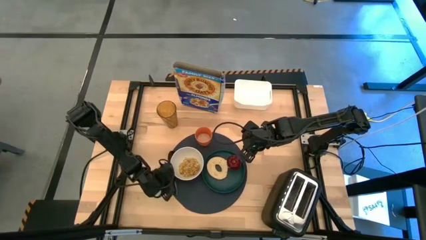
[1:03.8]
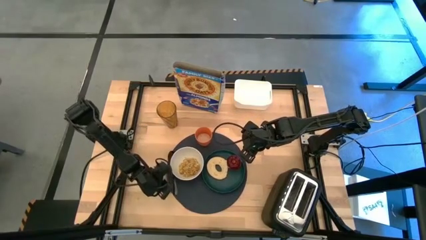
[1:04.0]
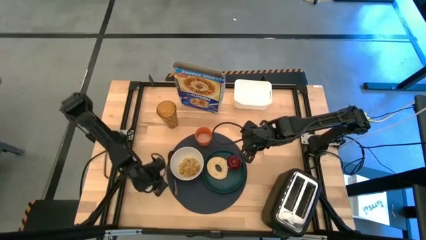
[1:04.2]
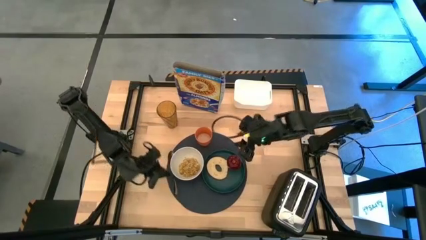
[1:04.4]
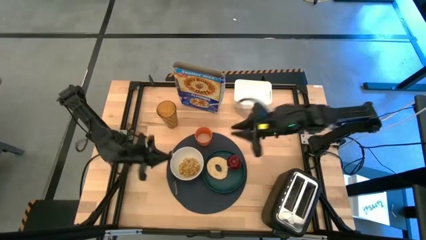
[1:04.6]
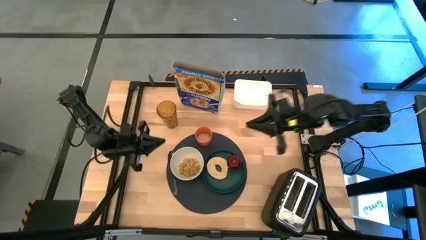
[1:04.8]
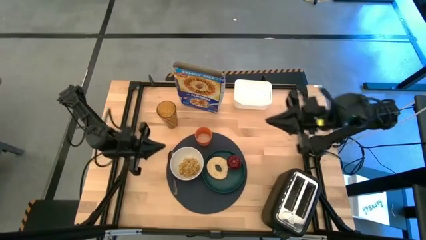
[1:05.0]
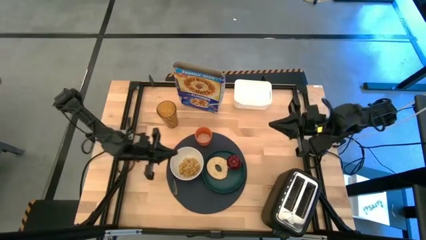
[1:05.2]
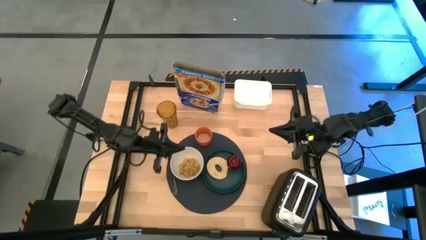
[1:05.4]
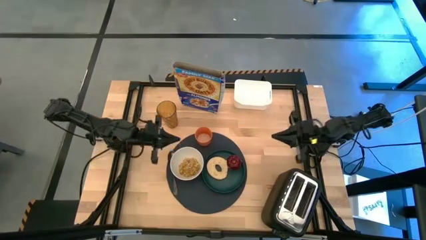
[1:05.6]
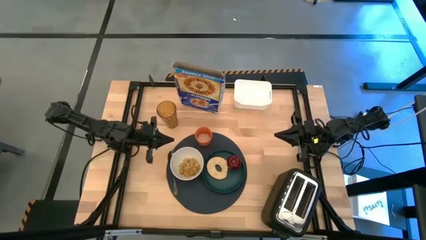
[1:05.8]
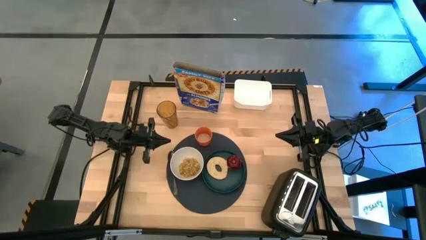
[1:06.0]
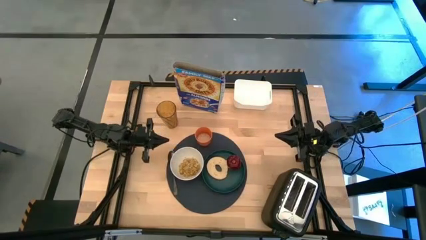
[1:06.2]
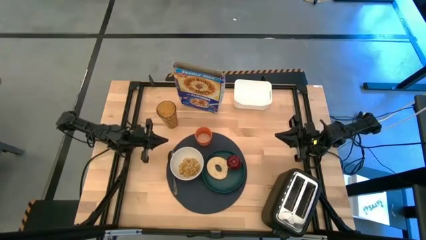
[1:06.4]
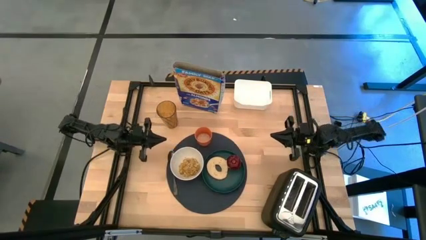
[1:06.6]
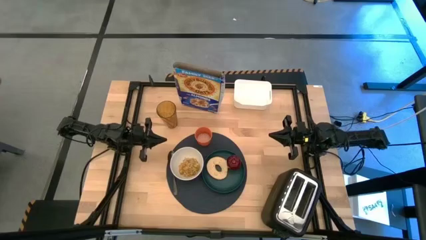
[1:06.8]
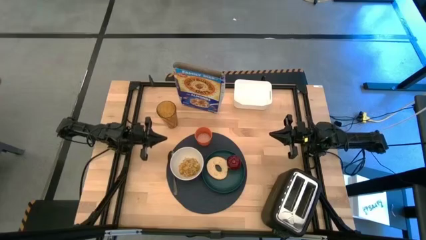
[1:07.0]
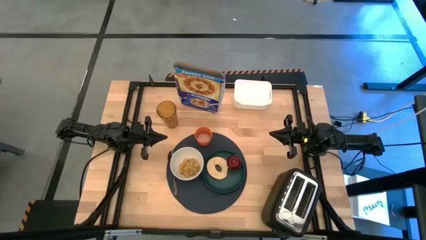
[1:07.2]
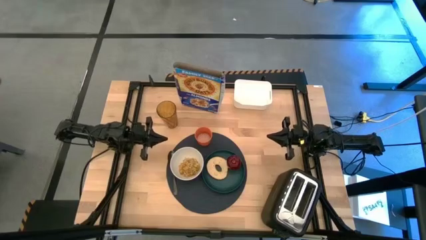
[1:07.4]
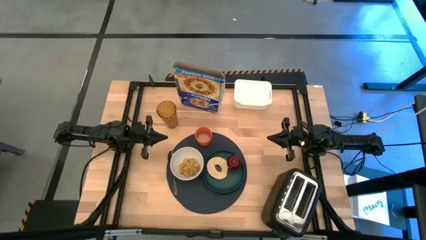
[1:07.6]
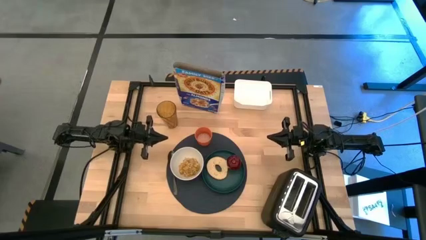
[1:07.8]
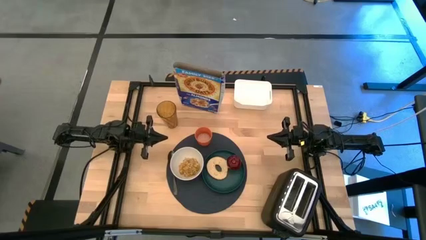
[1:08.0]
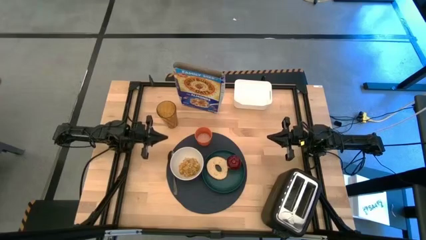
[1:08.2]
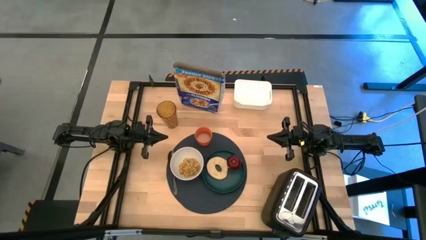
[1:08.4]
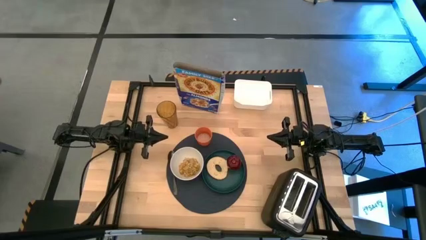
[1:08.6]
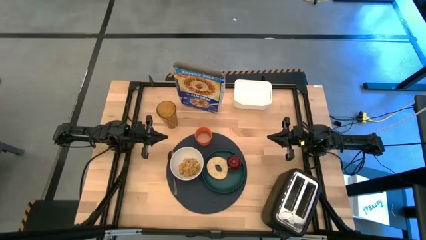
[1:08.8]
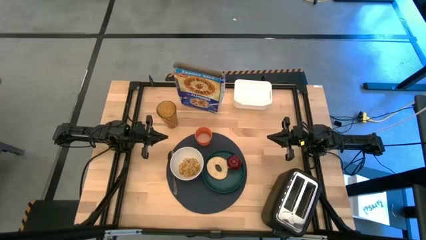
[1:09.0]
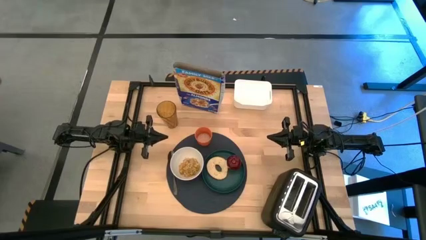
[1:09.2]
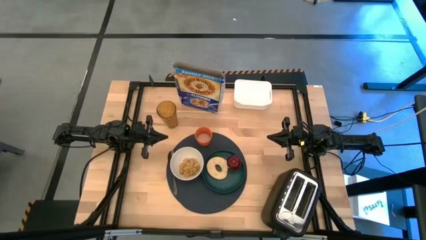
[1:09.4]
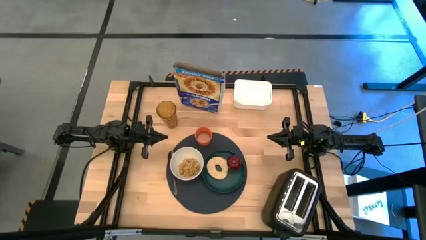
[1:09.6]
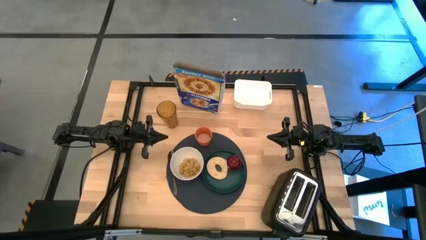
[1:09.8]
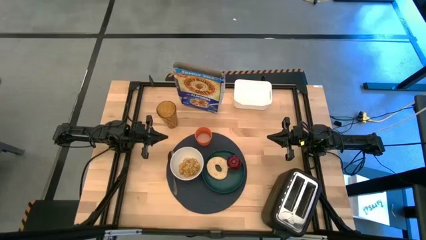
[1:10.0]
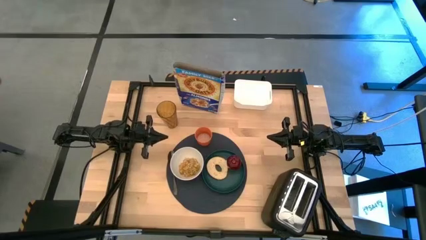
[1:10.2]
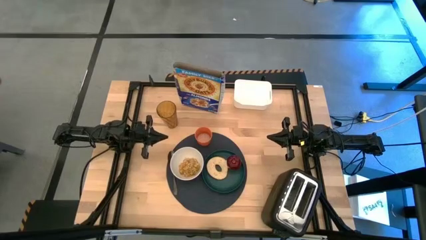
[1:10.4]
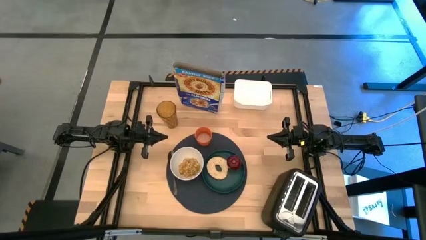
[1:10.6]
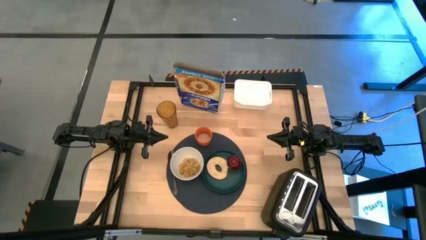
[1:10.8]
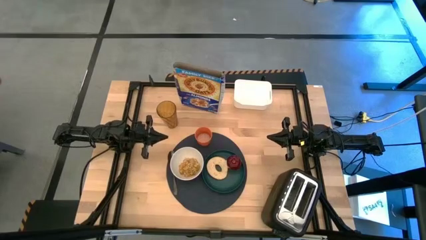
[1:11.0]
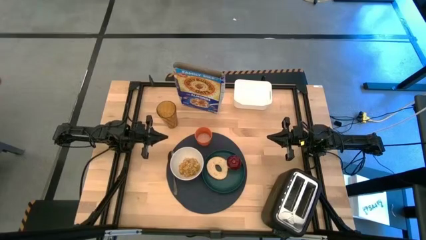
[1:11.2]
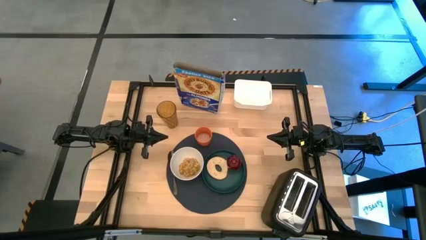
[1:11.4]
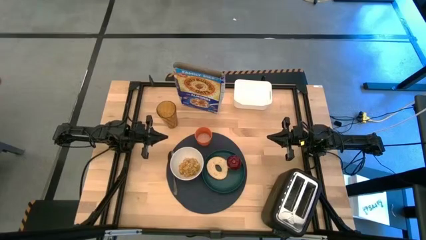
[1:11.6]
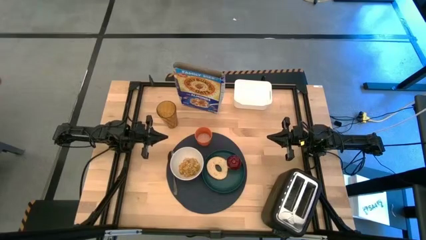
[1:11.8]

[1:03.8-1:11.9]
Task: Arrange a breakfast setting
Return to Home Position

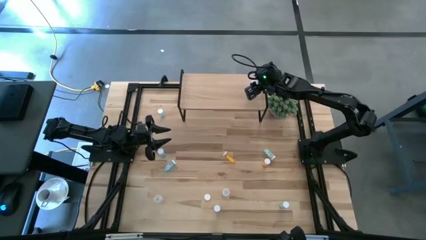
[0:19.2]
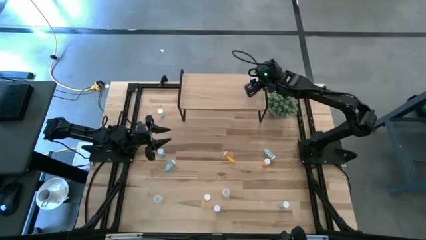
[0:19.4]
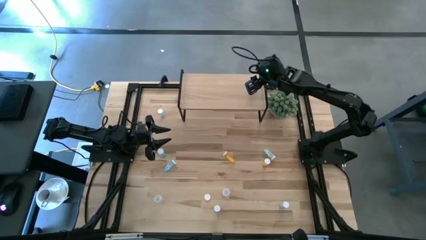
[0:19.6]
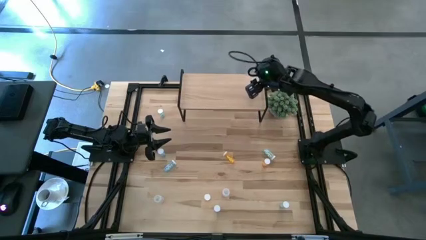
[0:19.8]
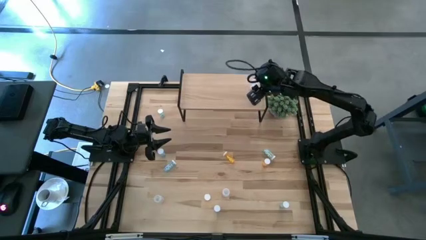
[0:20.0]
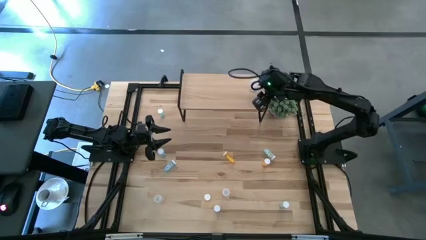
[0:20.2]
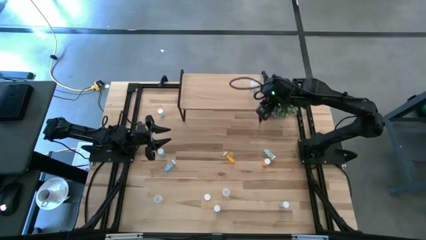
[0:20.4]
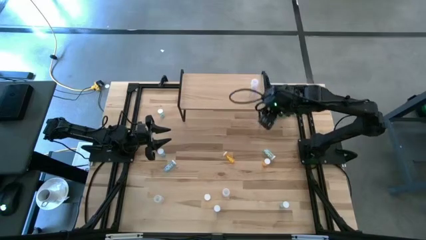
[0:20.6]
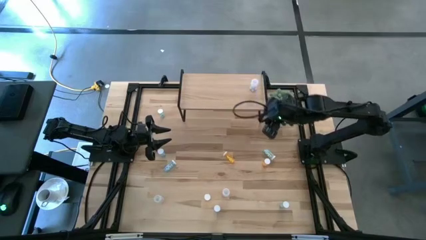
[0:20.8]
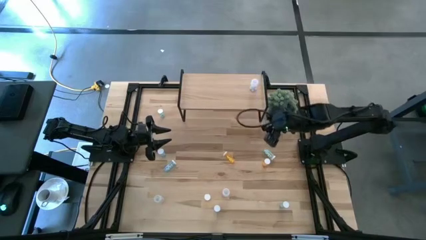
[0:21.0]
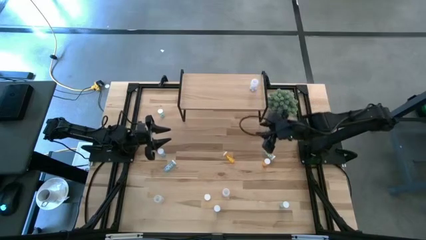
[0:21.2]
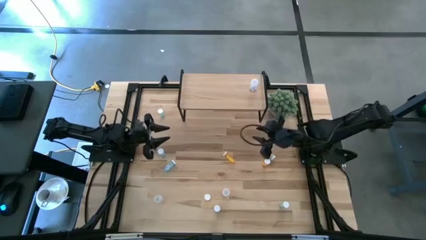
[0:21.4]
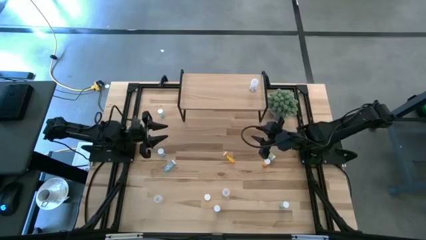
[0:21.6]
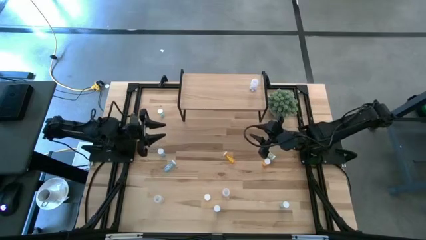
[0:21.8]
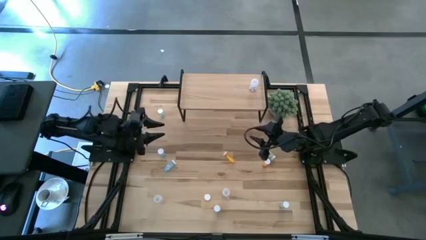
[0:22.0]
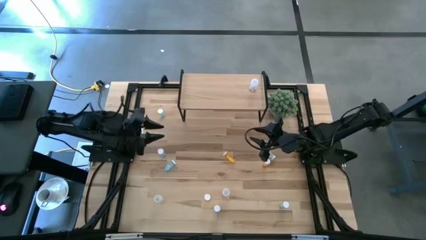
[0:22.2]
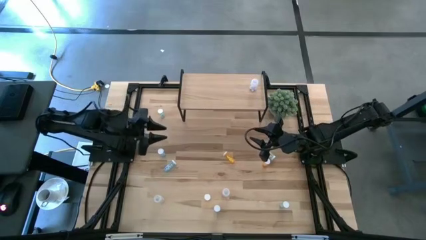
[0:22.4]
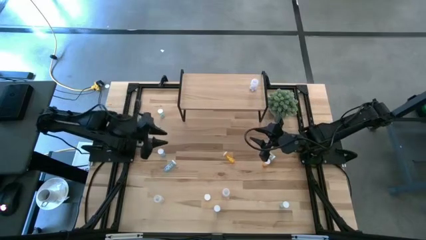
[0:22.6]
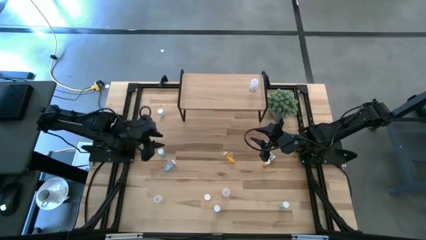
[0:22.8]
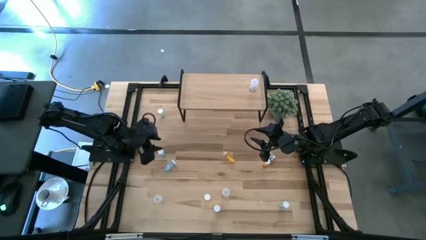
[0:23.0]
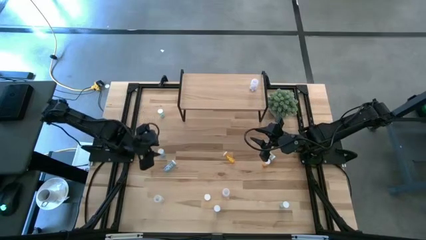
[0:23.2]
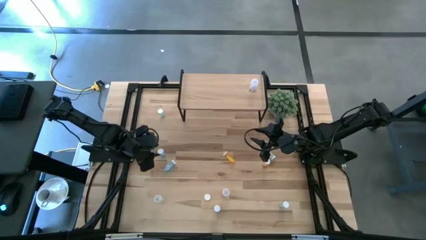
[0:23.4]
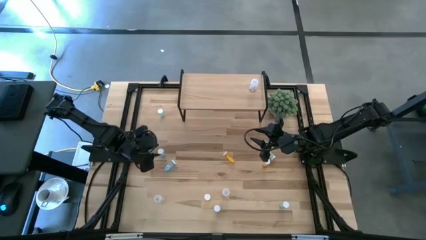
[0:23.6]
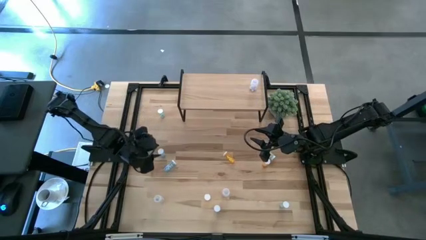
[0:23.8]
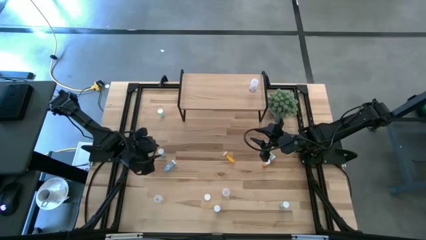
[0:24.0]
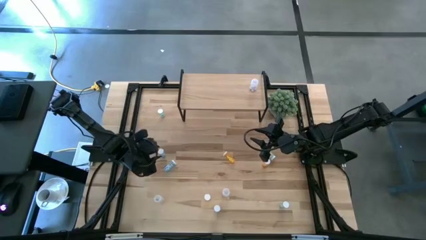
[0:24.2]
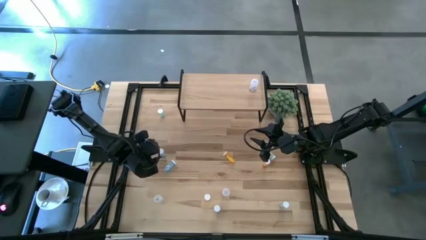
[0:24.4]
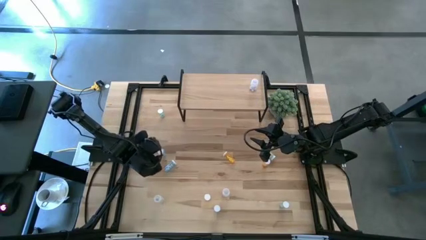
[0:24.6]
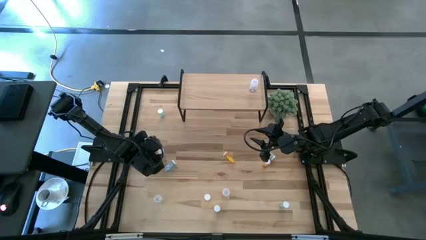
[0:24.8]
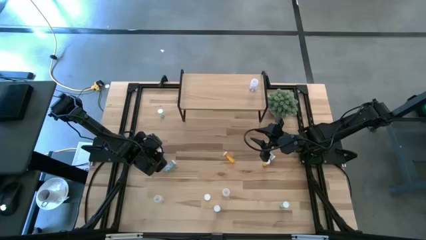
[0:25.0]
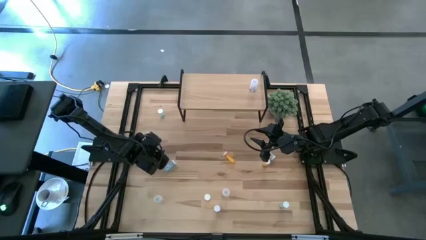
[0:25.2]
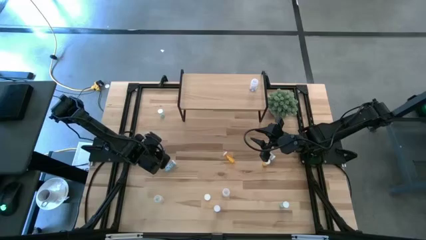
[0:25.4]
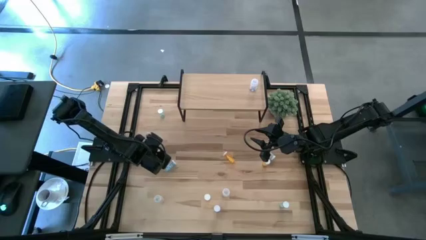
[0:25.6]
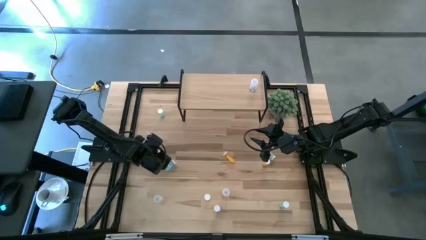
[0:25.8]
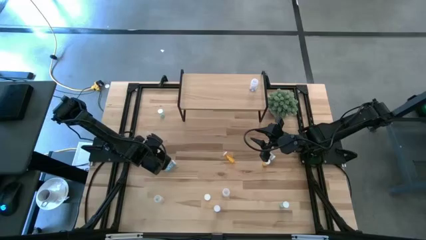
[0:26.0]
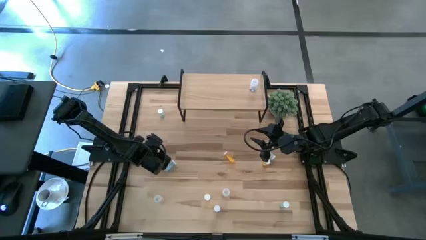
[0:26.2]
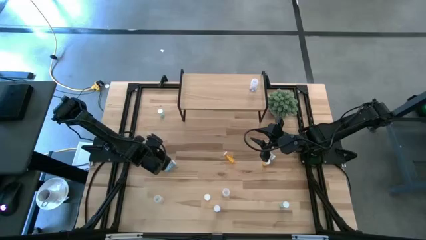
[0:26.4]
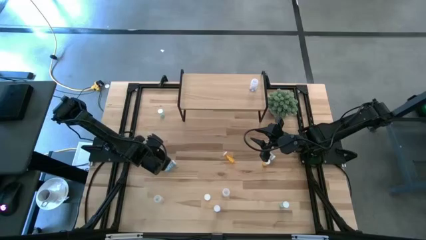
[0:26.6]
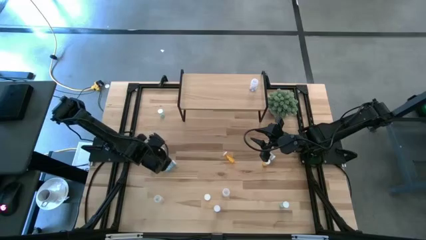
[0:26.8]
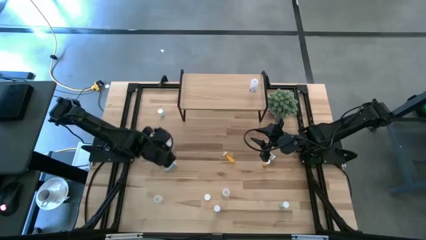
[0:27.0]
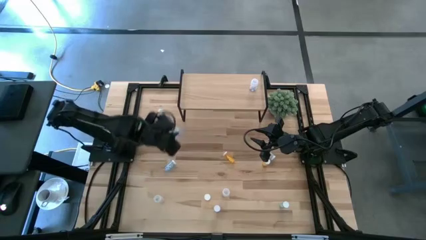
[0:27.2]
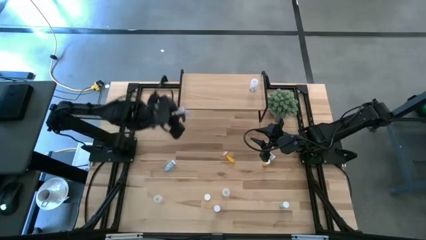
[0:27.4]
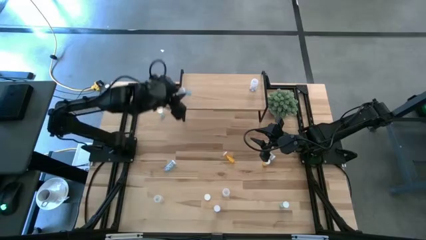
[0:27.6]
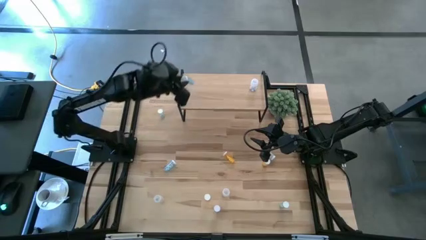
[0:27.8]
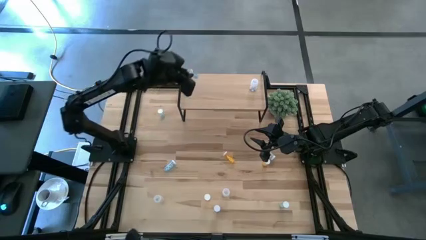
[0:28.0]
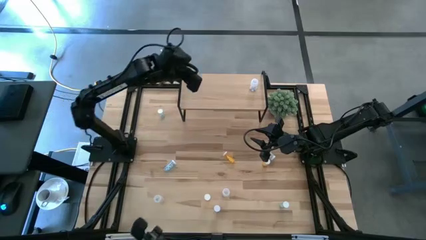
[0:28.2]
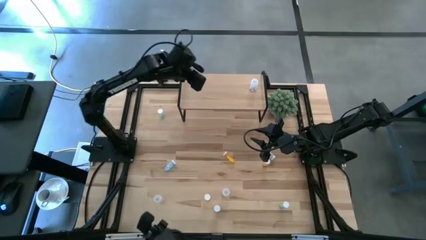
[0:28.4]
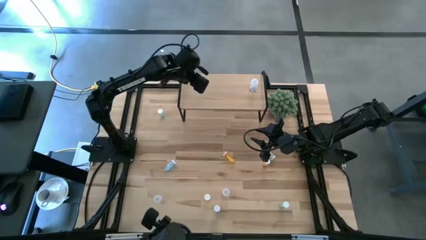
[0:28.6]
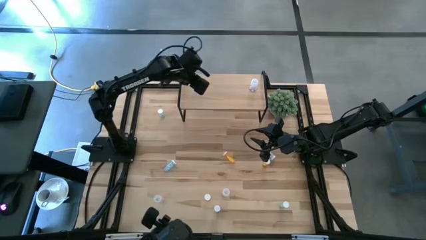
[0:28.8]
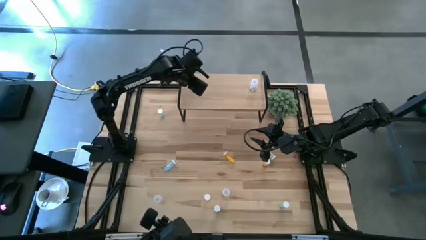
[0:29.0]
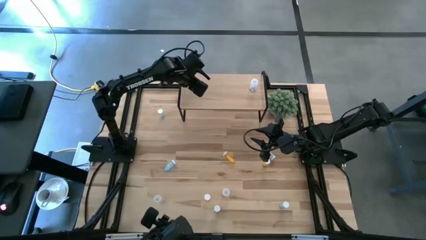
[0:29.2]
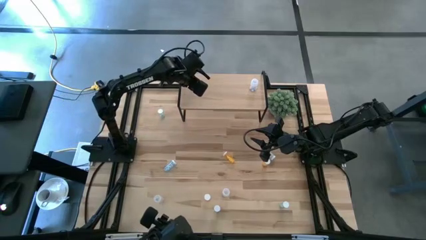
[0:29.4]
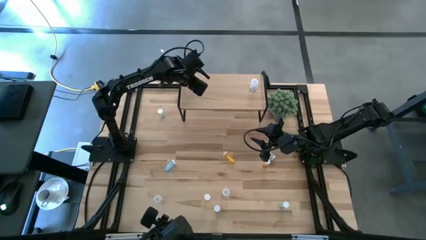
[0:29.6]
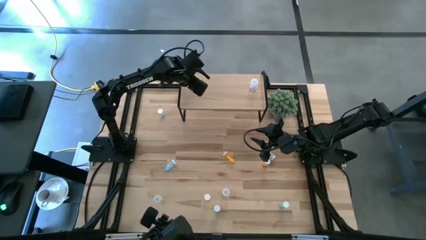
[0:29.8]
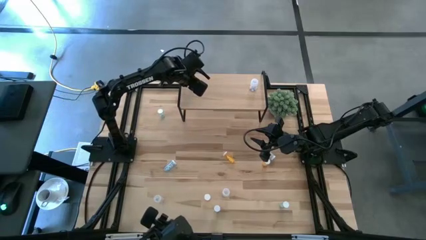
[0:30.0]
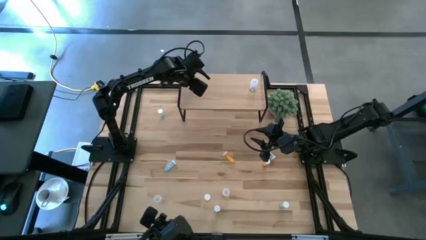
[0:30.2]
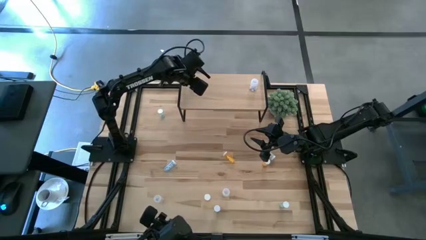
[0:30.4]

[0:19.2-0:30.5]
Task: Pick and place medicine bottles onto shelf by color
Put the top left blue pill bottle on the shelf
